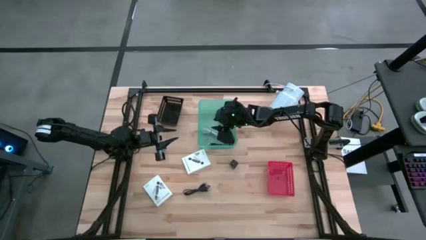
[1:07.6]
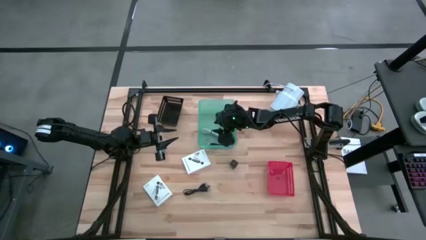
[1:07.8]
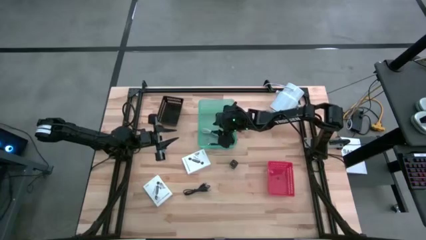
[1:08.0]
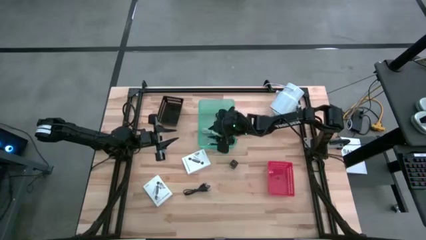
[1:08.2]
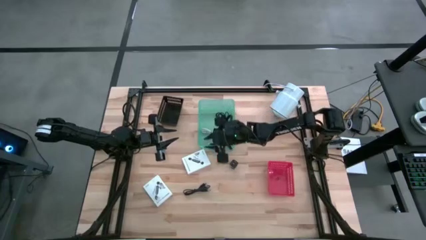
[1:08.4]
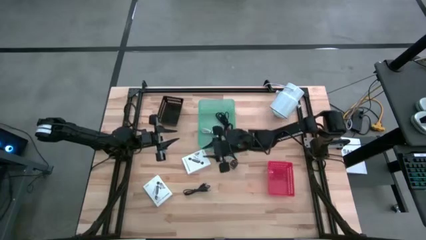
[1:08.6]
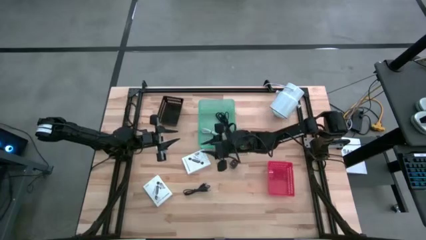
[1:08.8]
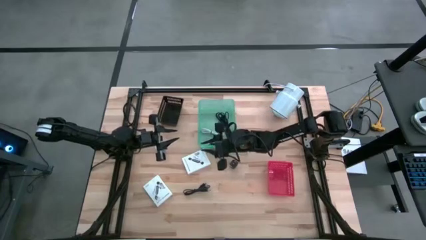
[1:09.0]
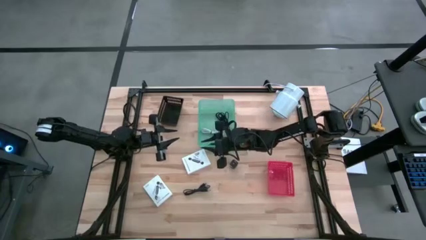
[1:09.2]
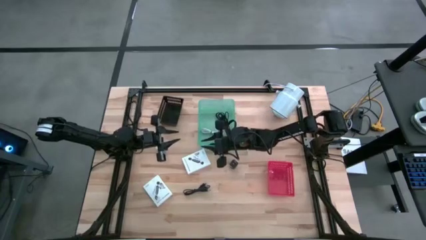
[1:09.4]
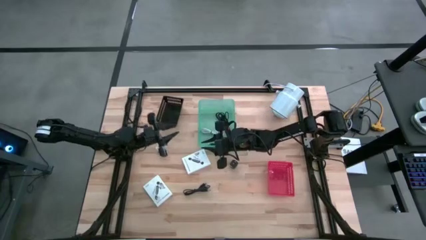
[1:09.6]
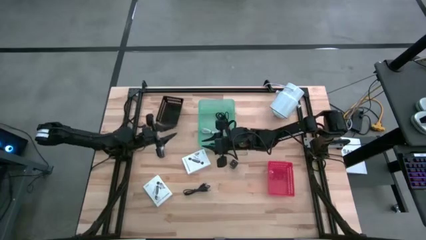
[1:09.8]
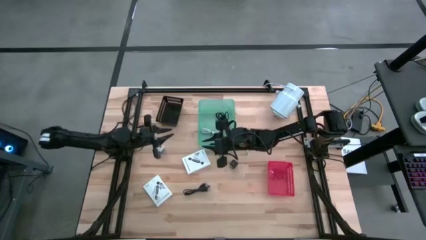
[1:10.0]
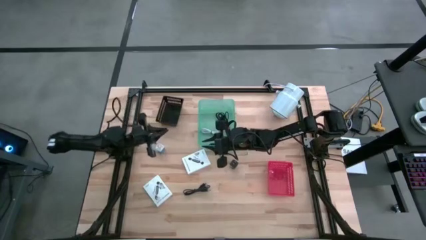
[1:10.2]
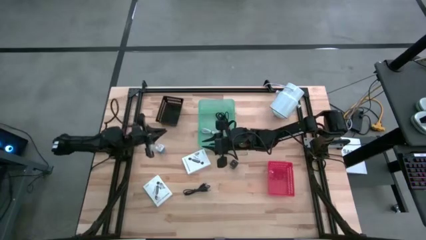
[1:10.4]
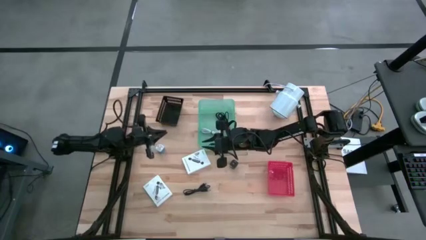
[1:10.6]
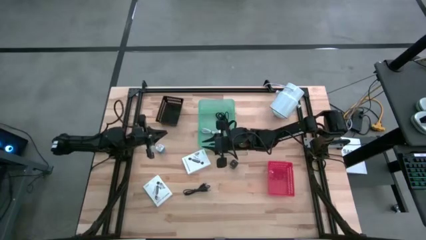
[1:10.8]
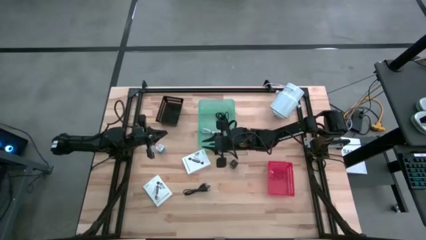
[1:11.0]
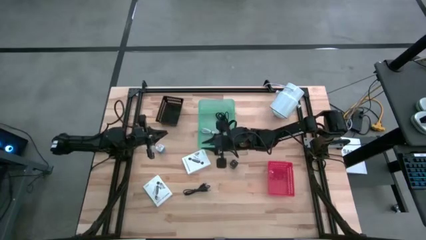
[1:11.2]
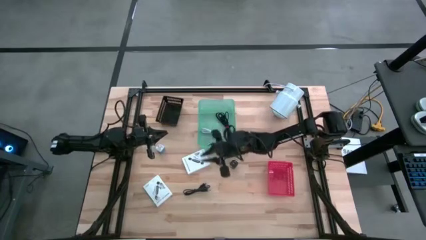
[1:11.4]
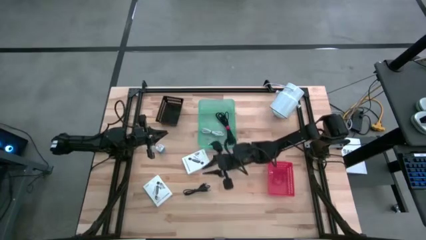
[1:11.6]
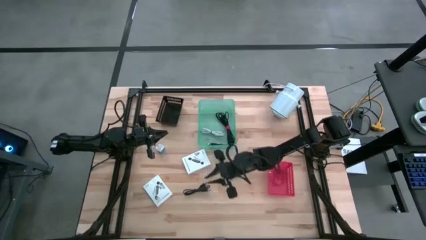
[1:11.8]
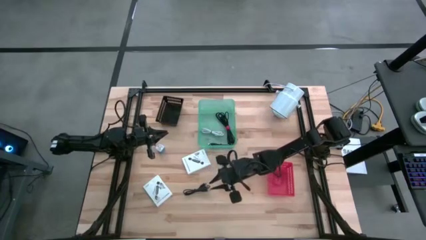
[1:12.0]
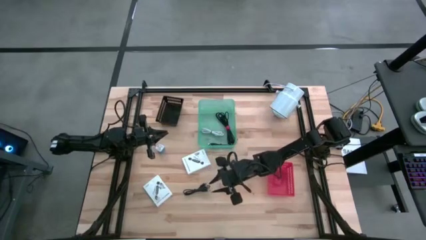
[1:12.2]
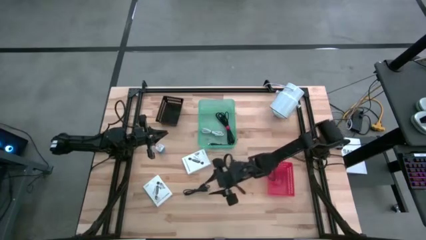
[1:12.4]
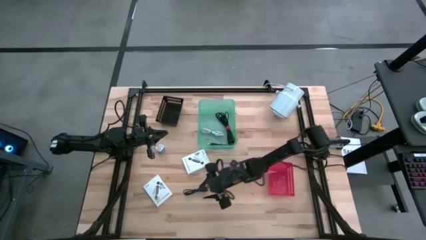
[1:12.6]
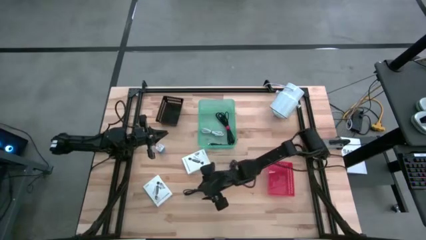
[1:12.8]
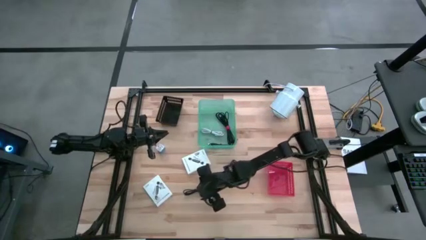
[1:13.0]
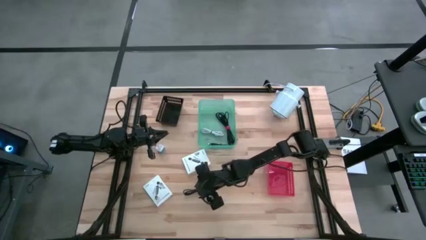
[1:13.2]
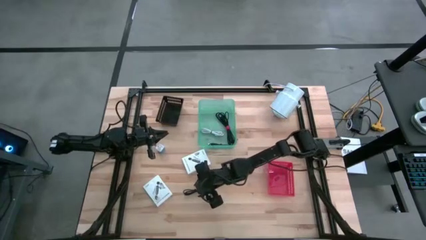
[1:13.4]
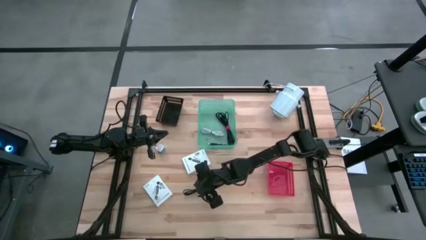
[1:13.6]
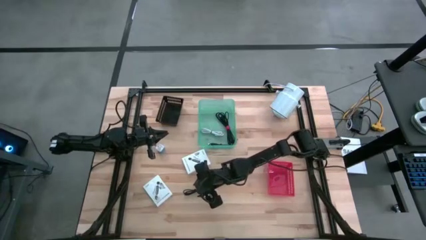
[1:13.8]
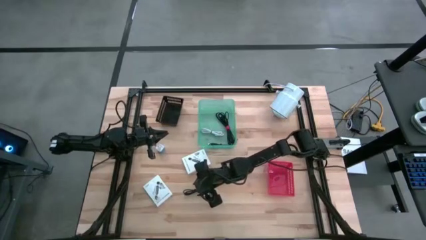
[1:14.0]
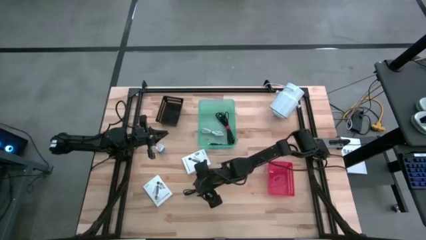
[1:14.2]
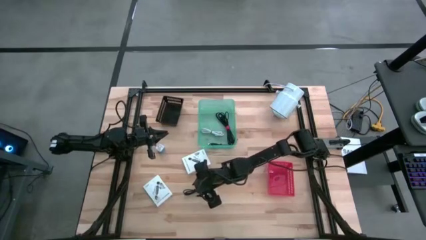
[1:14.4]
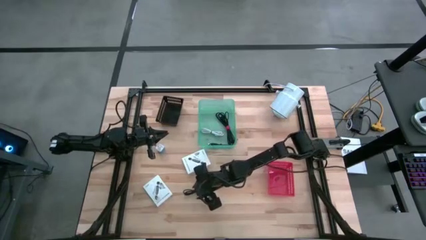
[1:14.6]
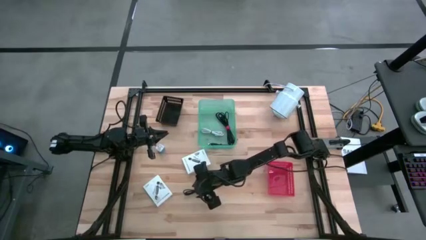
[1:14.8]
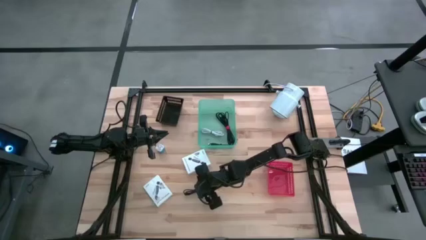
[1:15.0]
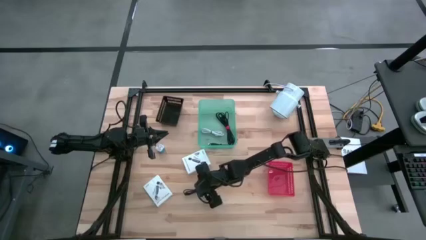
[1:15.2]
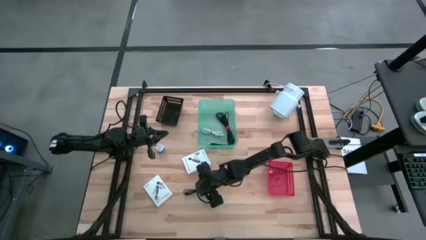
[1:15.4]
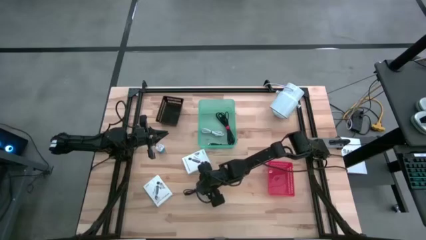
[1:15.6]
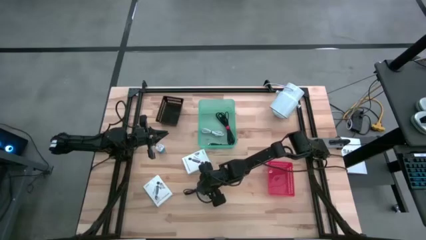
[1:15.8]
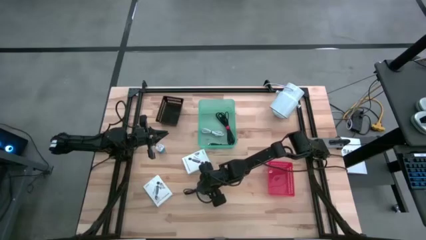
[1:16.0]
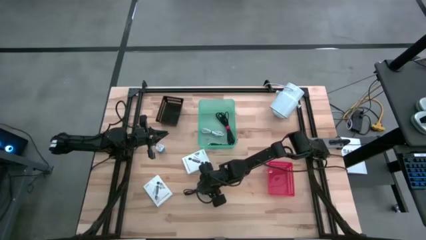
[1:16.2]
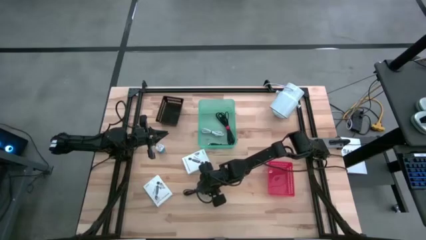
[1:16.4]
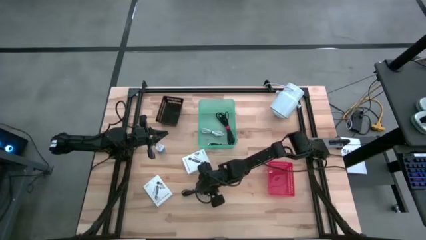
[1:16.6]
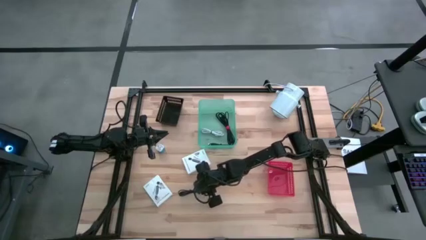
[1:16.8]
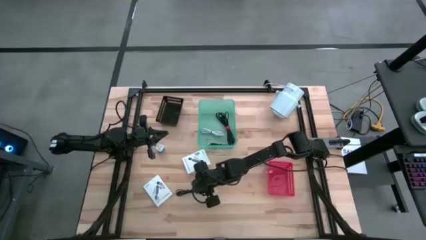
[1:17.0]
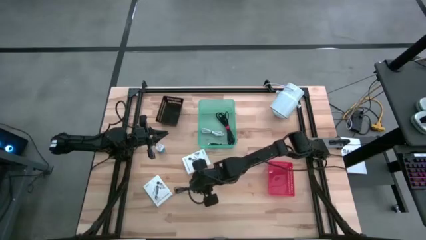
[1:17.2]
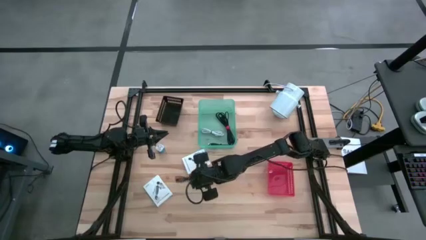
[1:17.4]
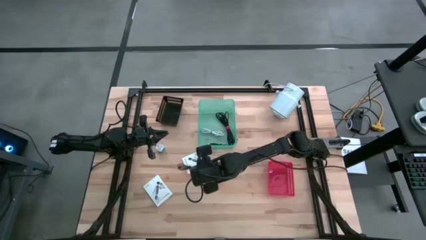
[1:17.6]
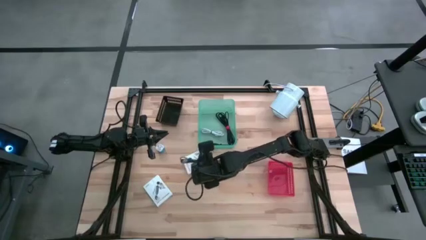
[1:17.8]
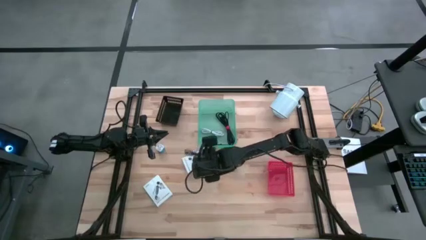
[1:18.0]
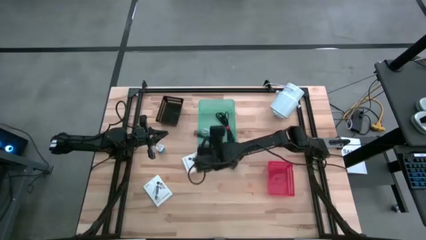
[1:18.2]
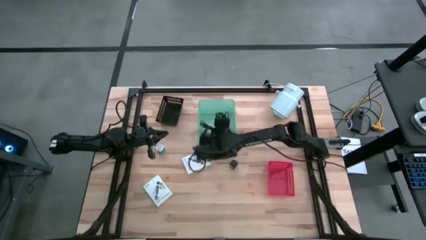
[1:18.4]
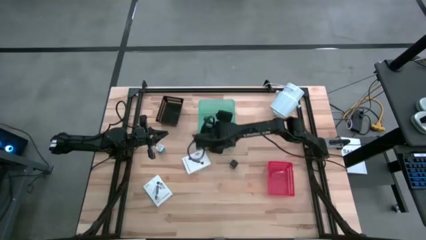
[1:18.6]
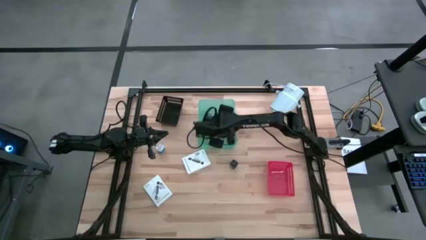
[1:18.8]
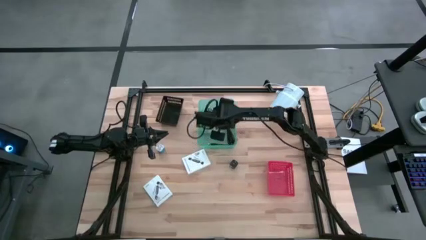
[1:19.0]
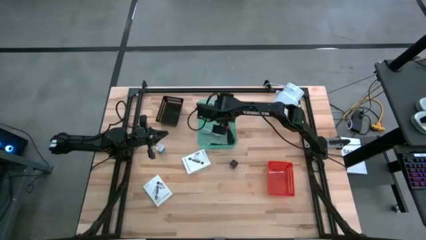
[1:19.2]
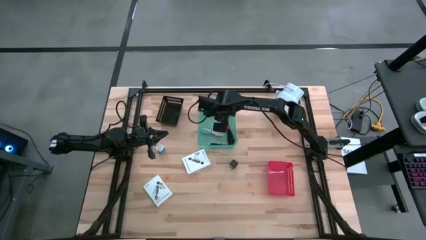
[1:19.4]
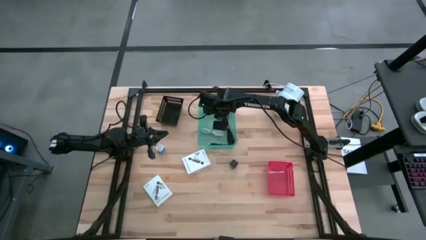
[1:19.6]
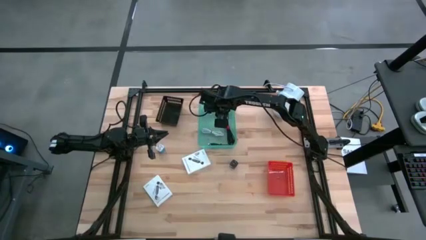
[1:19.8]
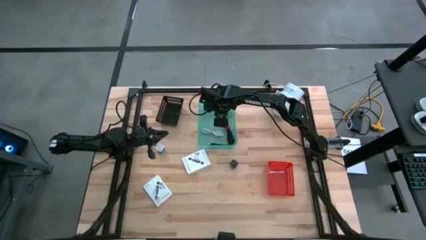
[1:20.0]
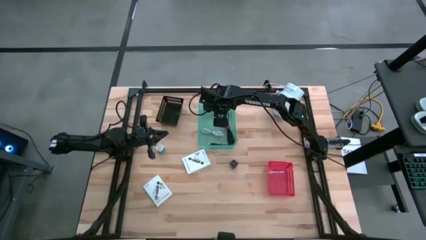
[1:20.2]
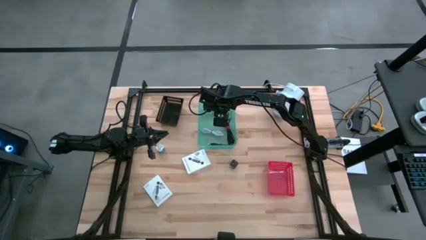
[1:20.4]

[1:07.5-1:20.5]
Task: Pick and place items into bin
Put the black charger cable into the green bin

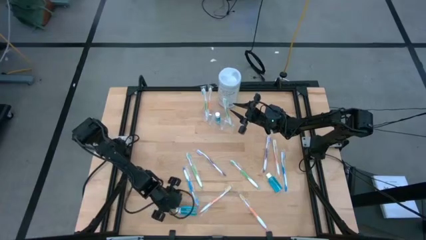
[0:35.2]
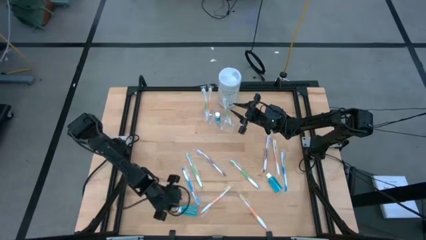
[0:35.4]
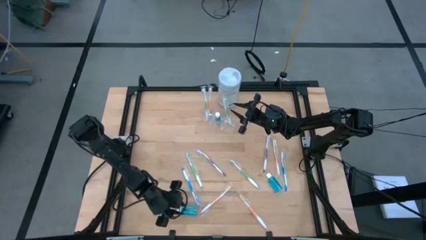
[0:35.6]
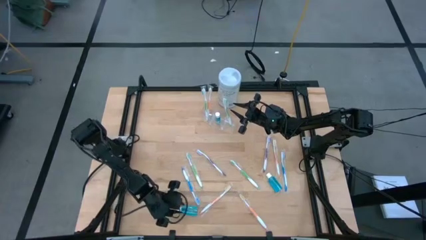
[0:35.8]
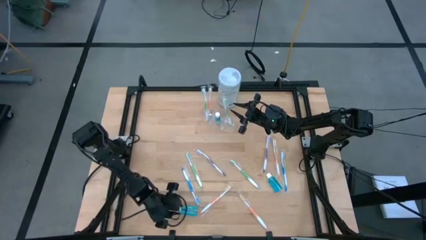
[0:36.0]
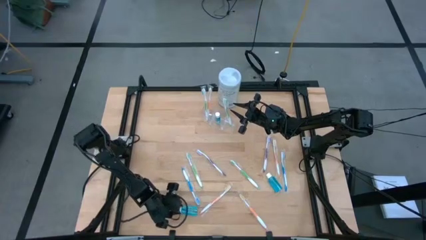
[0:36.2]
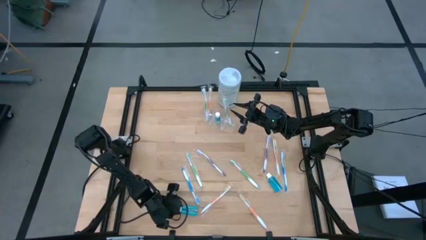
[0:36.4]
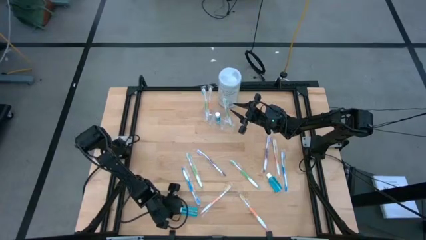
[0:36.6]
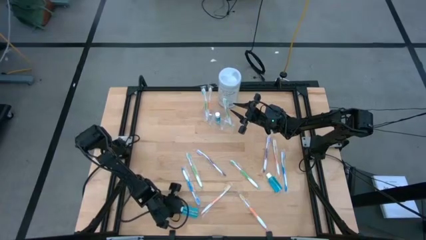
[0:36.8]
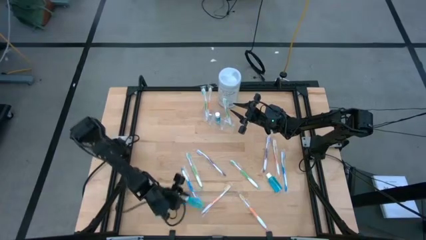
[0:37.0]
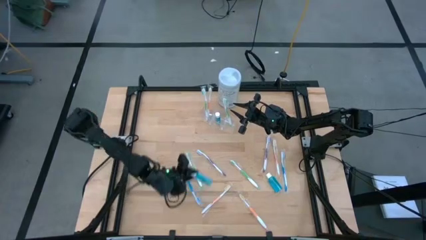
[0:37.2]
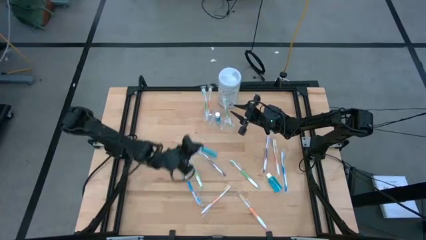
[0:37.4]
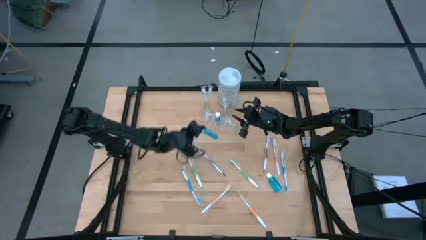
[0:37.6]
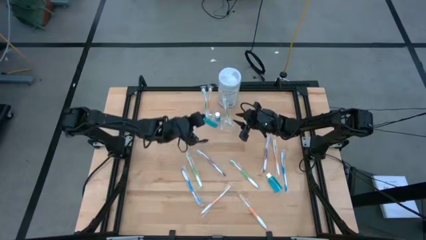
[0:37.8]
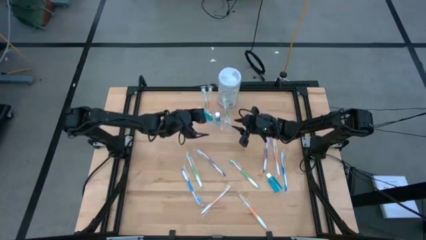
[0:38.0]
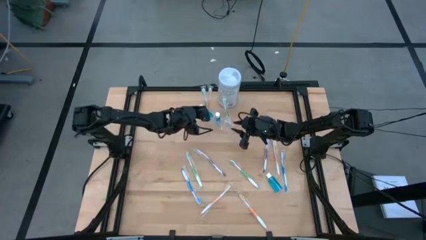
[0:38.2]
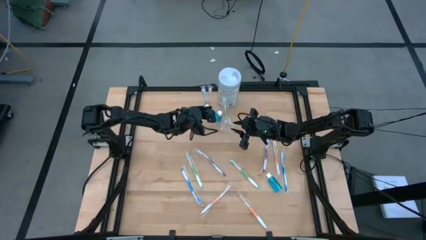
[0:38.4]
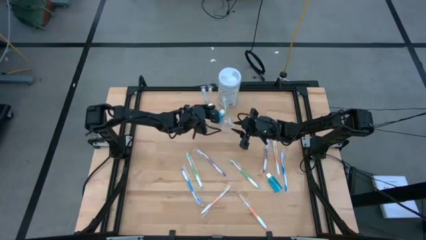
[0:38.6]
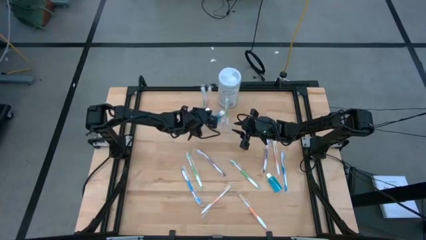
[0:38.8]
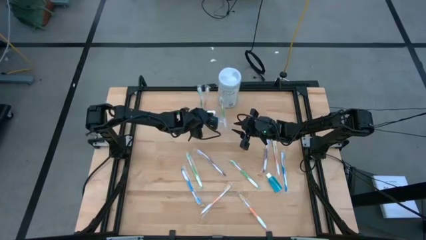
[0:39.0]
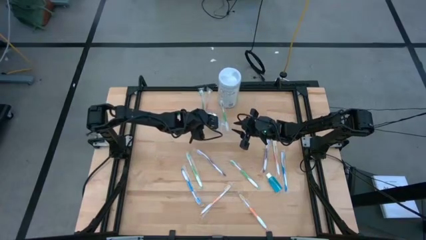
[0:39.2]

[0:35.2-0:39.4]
Task: Pick & Place toothbrushing station
Put the left blue mouthwash into the transparent organizer
